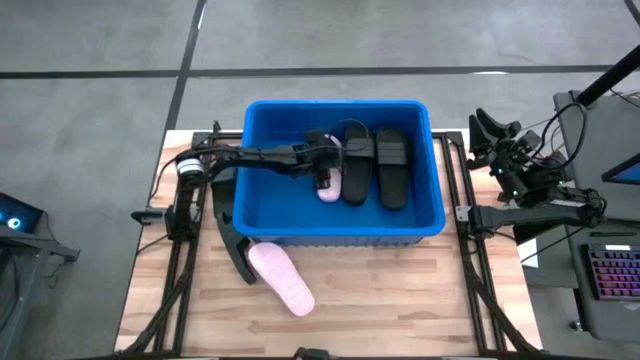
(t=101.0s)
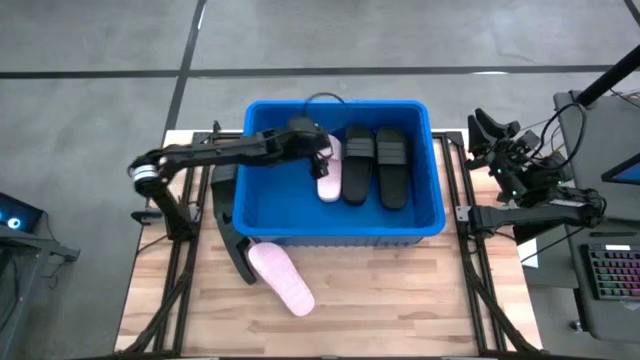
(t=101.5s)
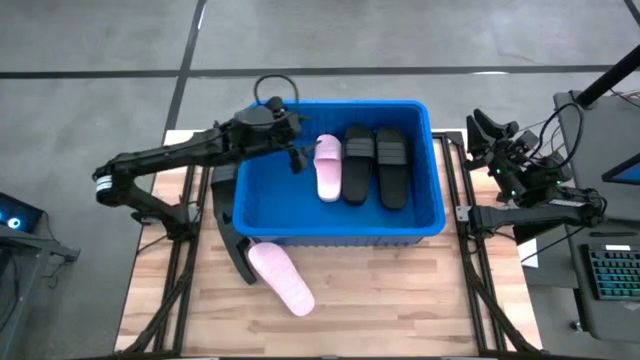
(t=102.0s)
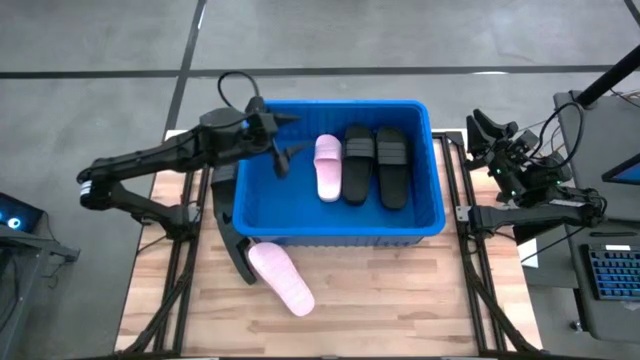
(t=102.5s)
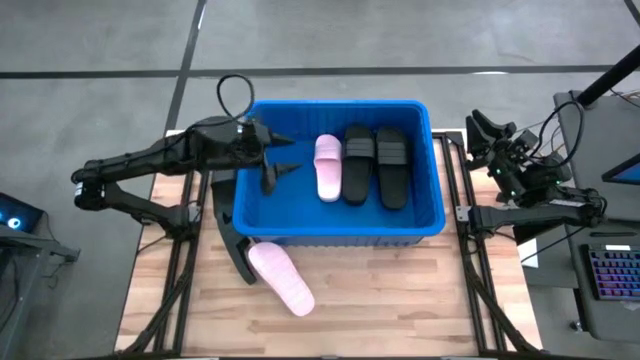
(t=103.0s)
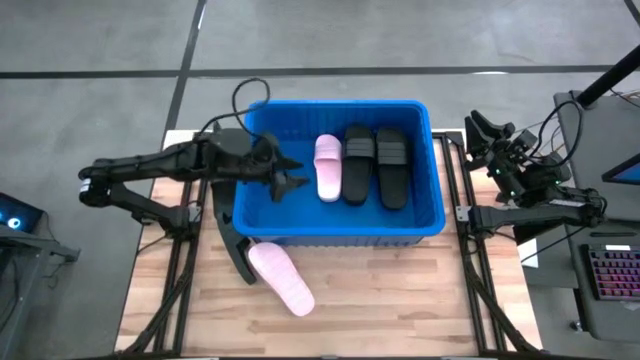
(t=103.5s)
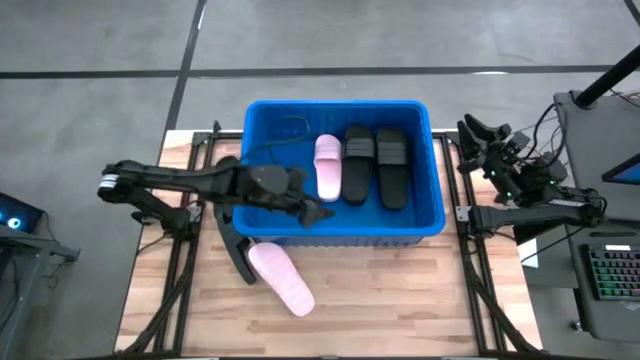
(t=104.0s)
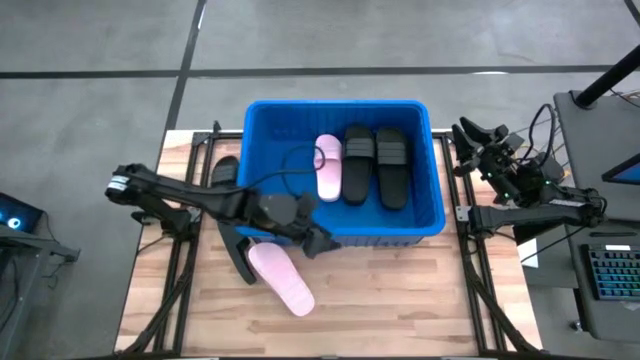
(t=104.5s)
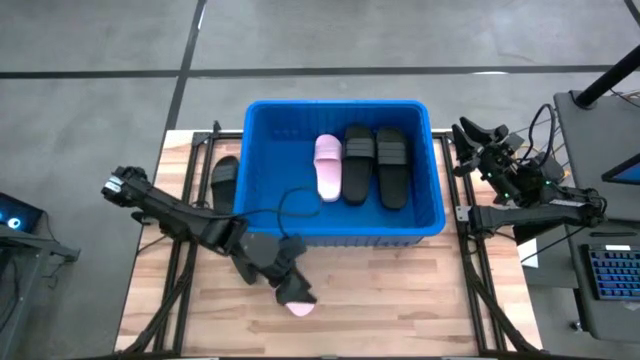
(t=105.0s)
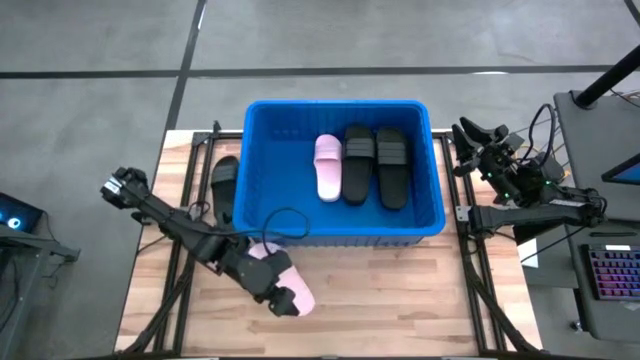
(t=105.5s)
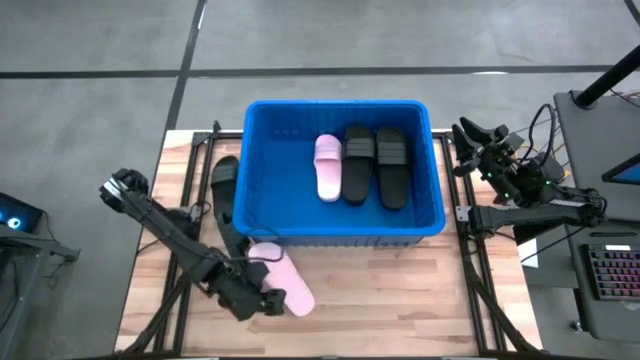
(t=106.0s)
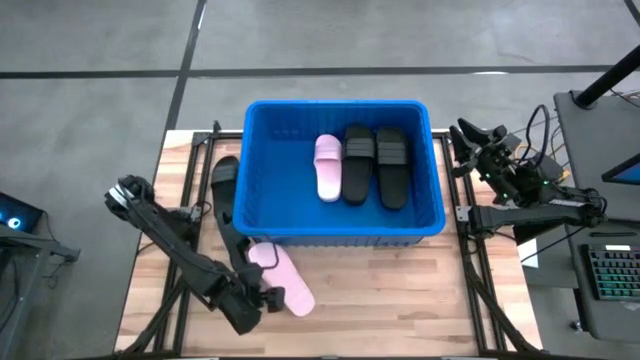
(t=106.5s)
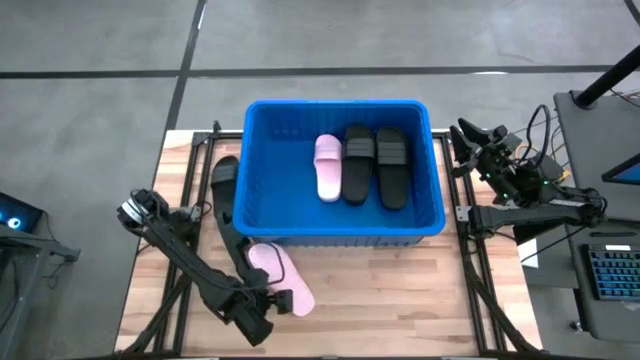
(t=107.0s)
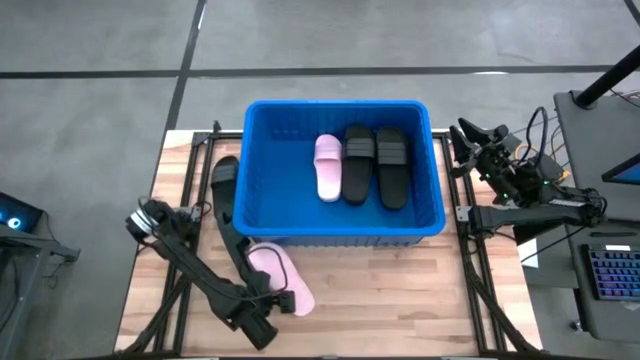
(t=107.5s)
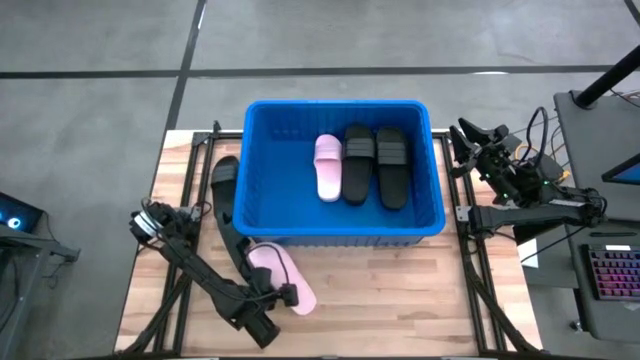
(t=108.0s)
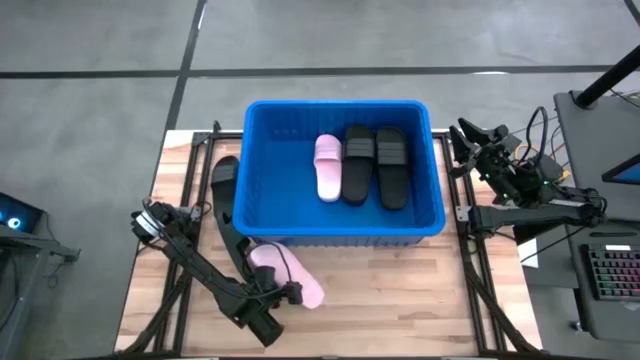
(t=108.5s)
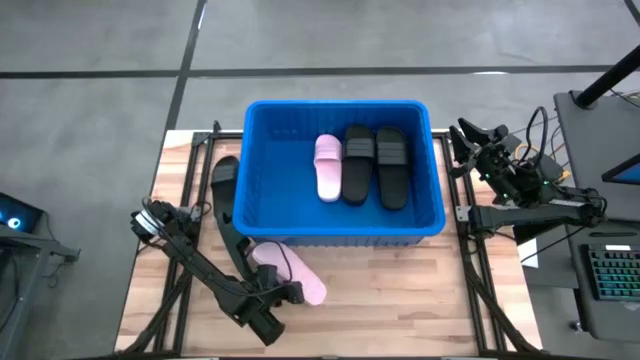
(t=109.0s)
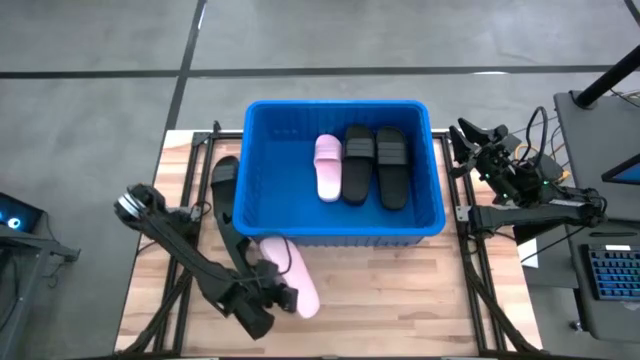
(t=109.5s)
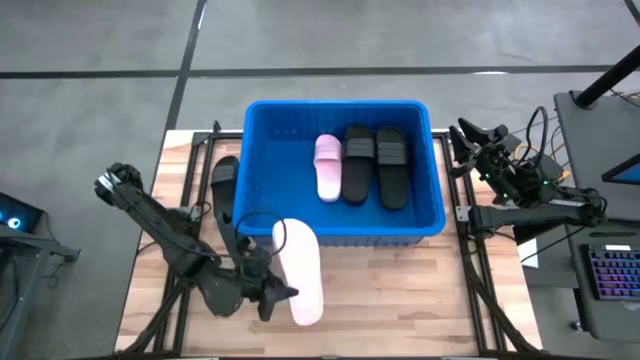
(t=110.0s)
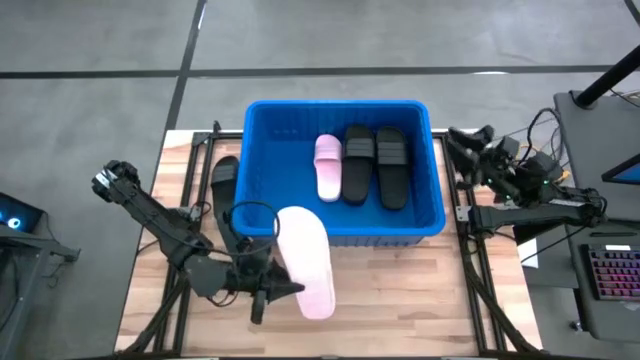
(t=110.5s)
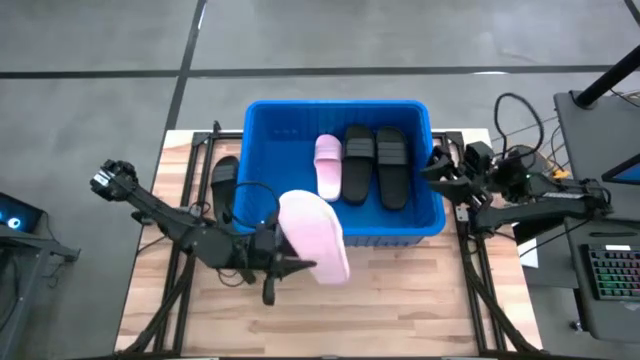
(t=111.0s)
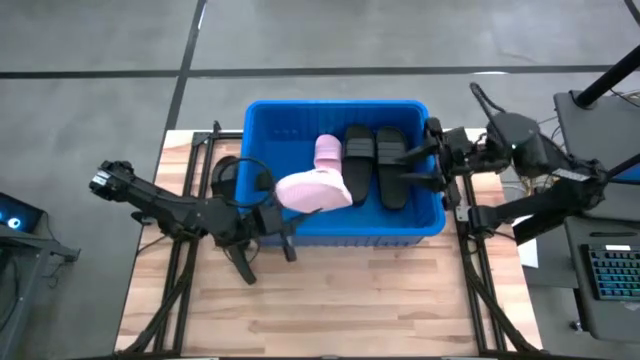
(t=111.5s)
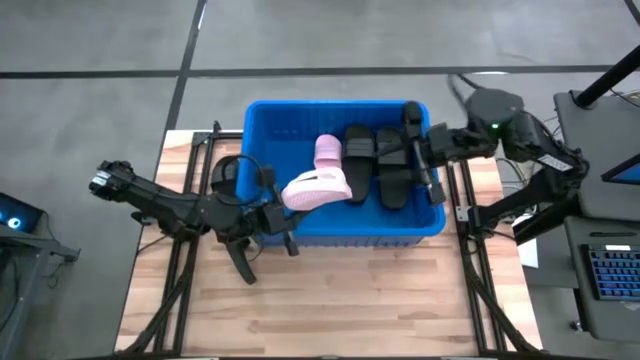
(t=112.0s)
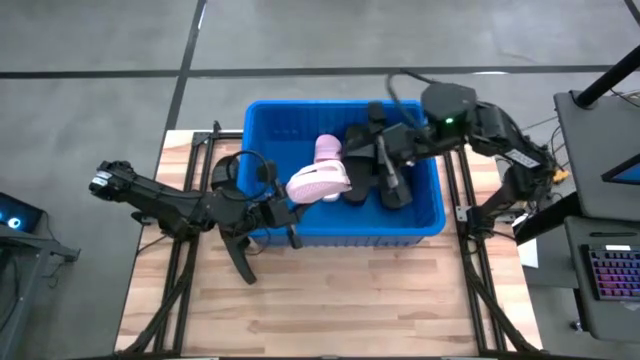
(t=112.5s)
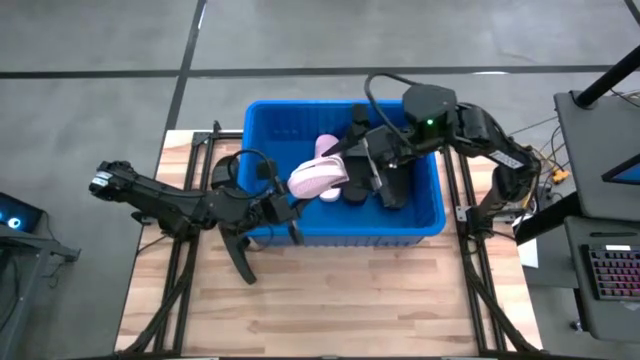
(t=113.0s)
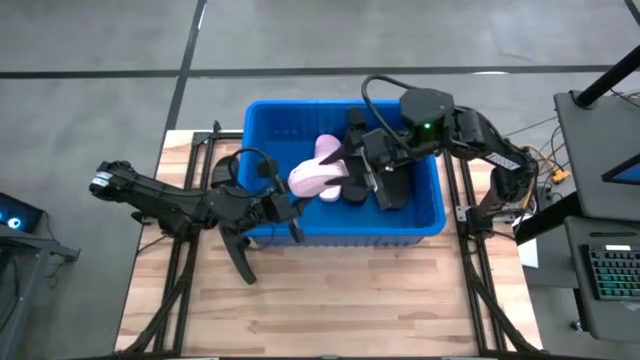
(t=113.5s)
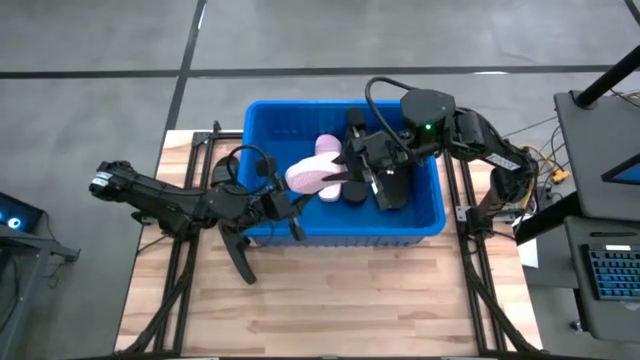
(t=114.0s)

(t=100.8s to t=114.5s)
Task: Pick and place slides into bin
Put the pink slide into the blue bin

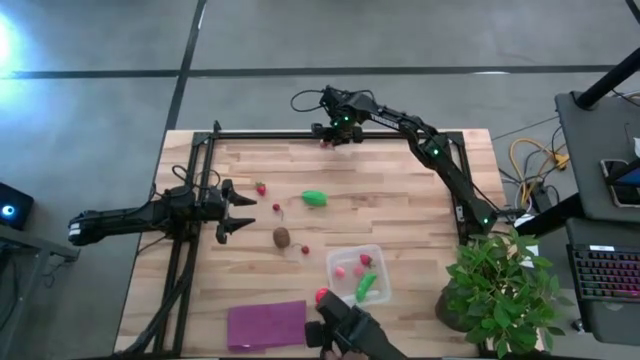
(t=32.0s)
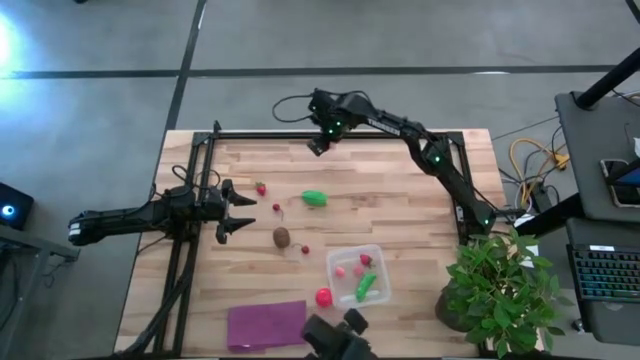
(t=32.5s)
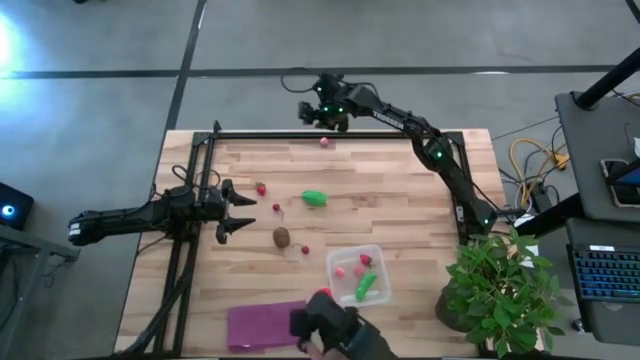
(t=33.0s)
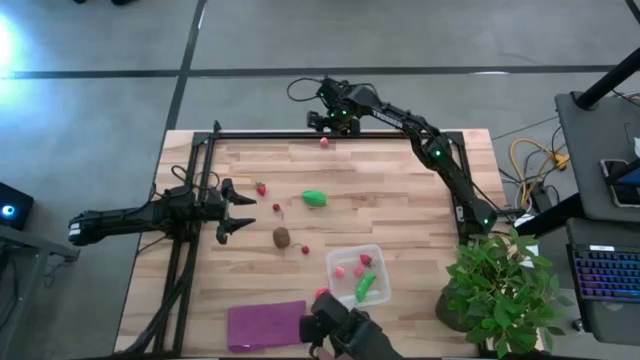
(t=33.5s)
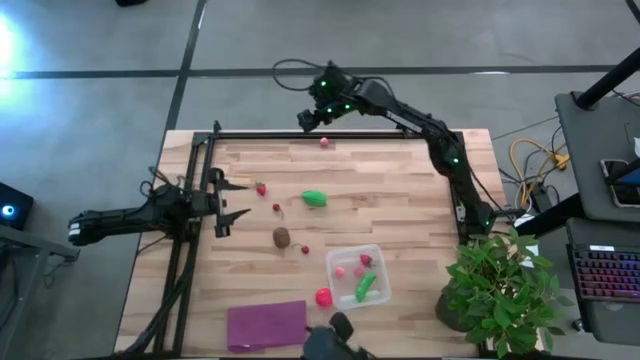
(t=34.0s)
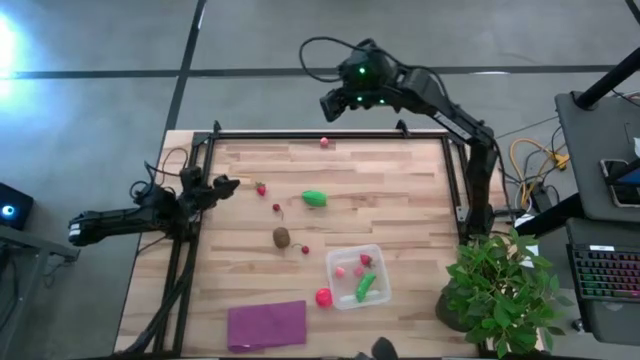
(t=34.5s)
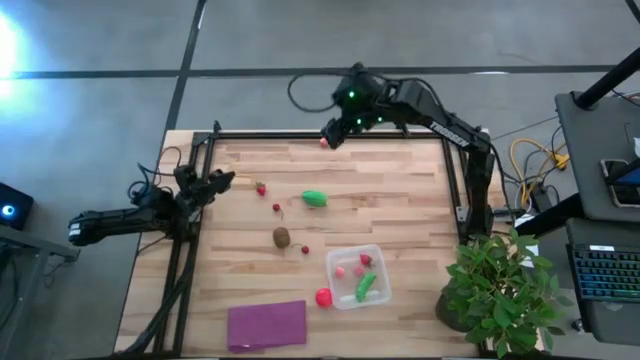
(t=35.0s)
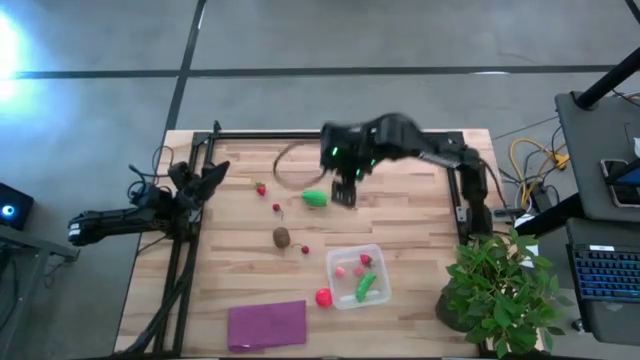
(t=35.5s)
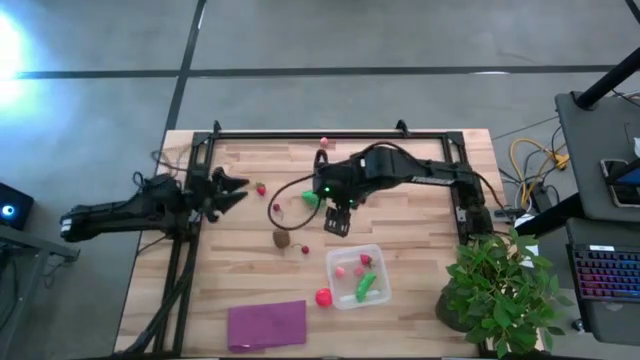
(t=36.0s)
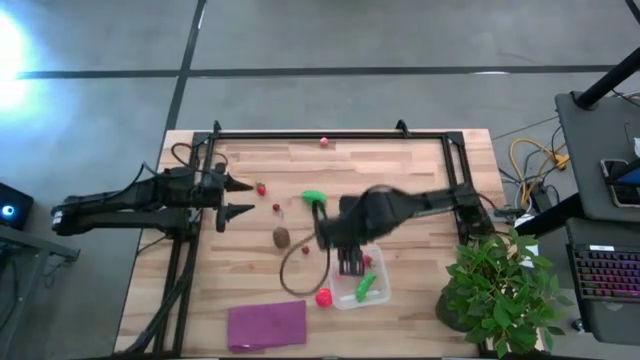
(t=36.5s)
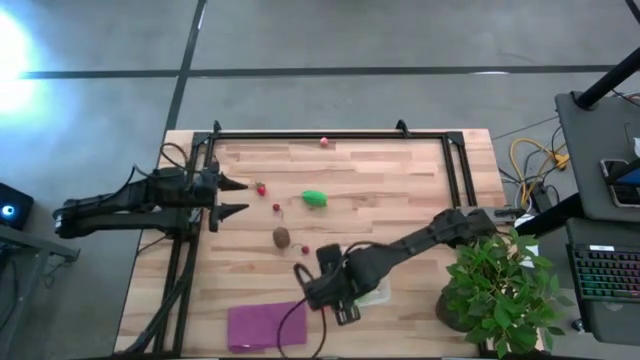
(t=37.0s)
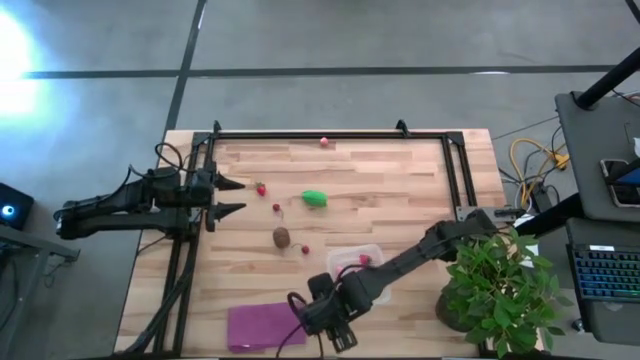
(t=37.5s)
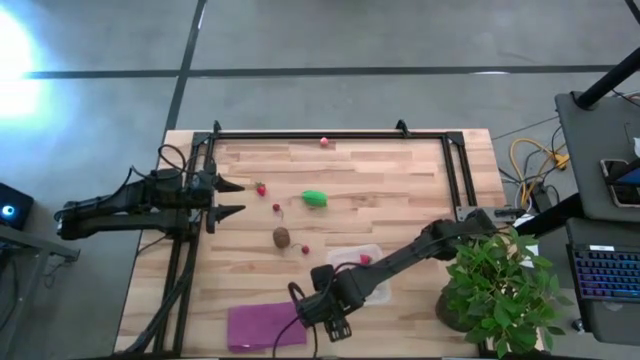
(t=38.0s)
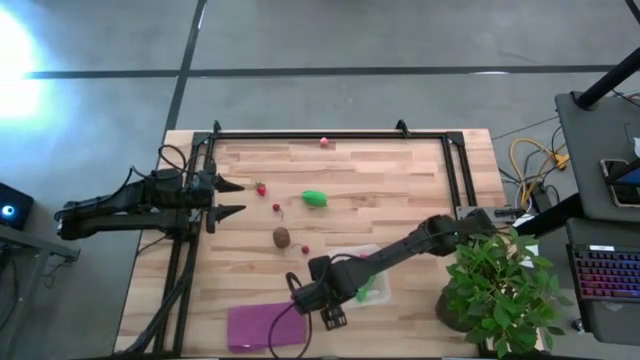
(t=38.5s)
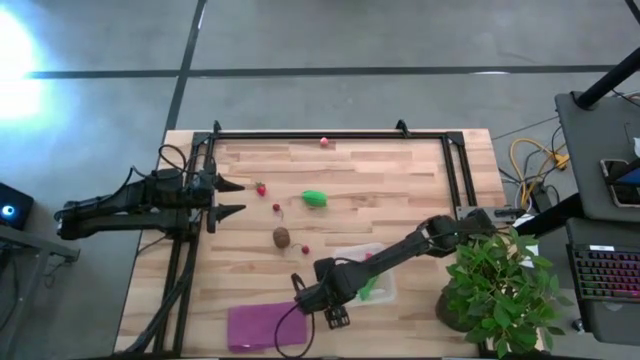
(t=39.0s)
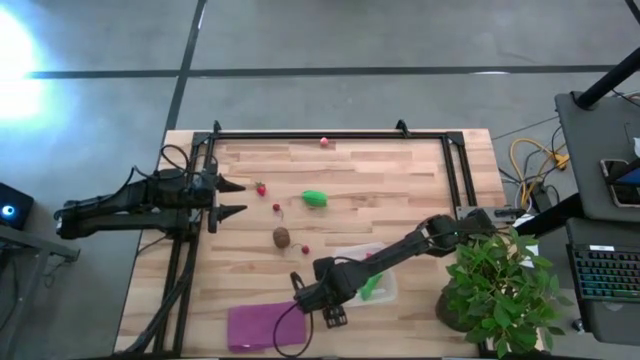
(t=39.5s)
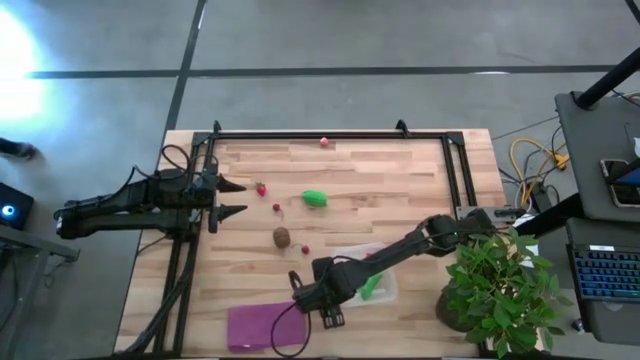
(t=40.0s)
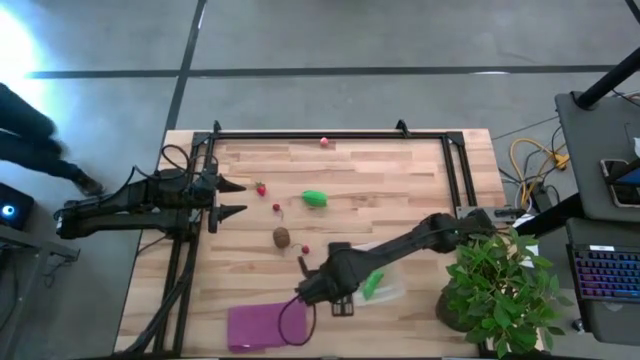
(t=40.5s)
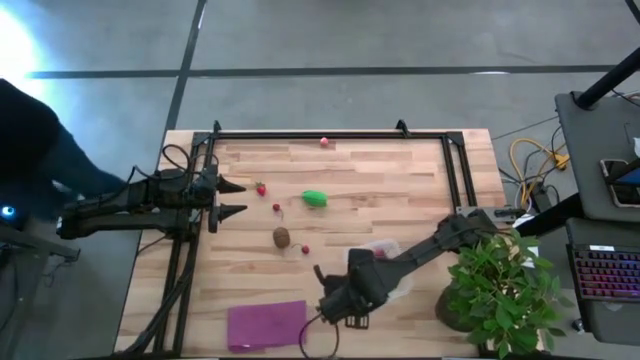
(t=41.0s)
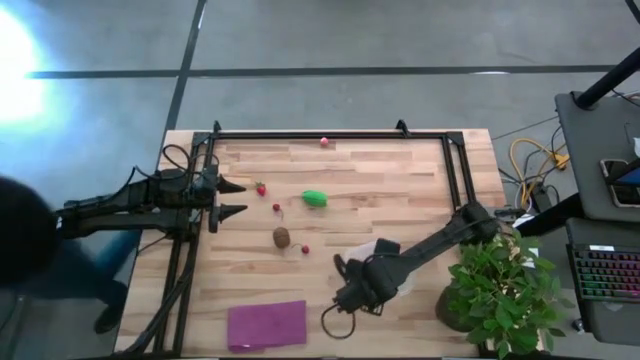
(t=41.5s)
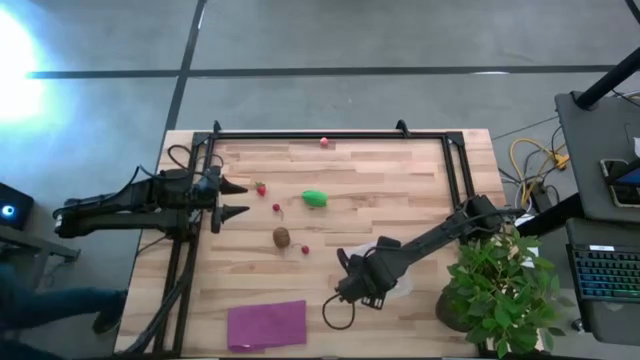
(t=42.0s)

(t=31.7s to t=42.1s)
Task: Pick and placing Produce into tupperware
Put the red tomato into the transparent container
